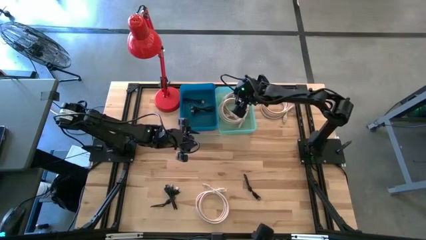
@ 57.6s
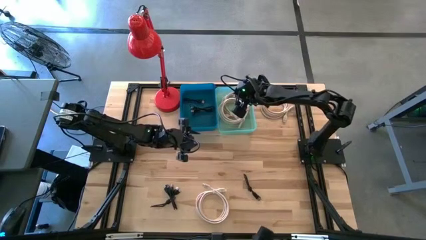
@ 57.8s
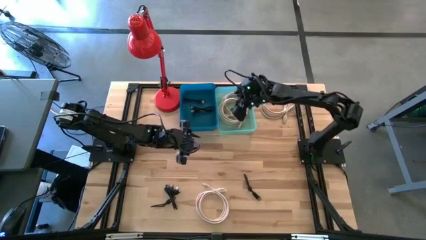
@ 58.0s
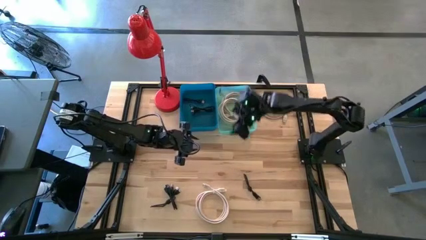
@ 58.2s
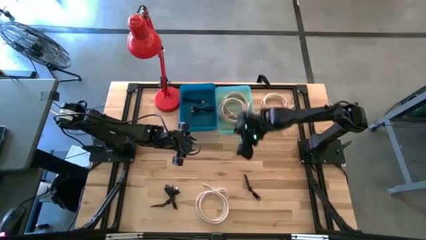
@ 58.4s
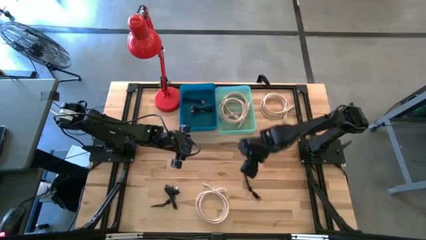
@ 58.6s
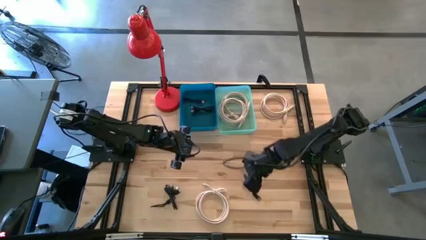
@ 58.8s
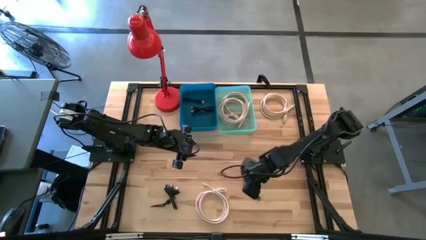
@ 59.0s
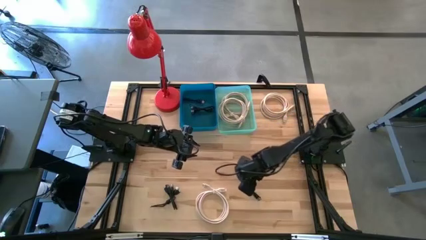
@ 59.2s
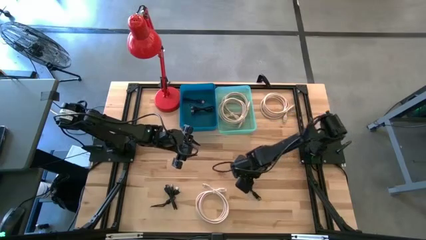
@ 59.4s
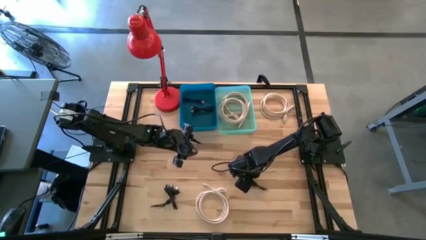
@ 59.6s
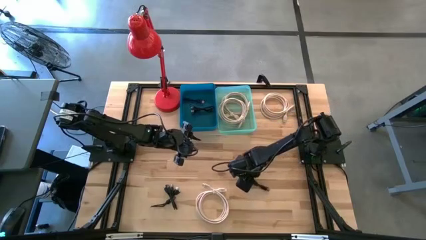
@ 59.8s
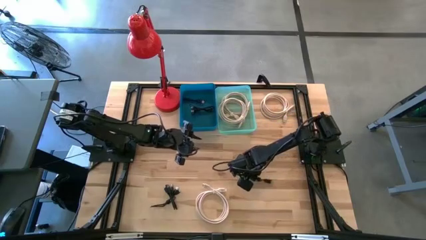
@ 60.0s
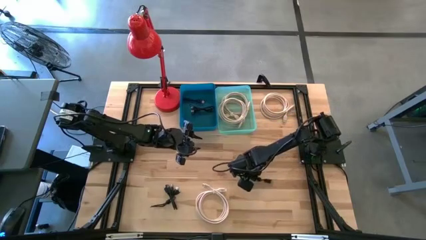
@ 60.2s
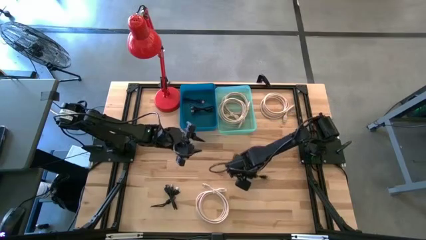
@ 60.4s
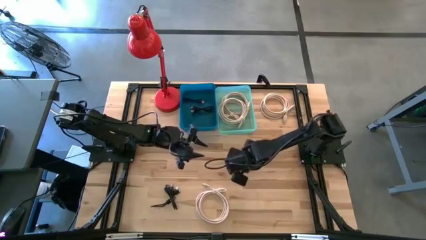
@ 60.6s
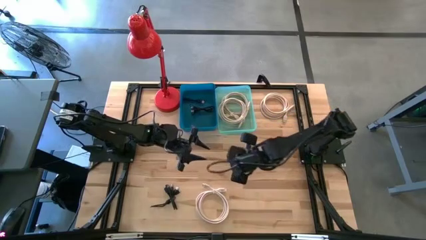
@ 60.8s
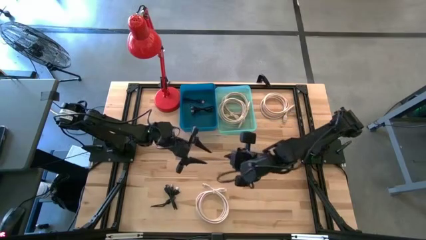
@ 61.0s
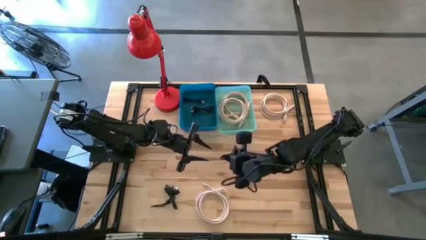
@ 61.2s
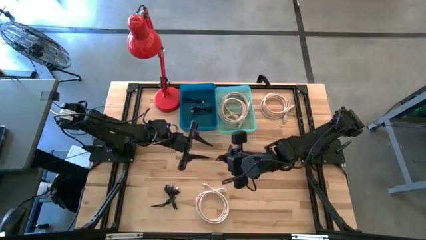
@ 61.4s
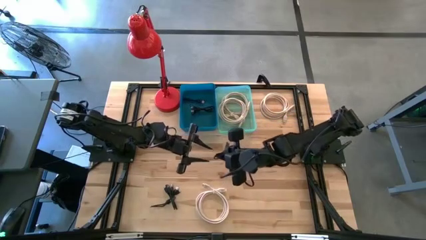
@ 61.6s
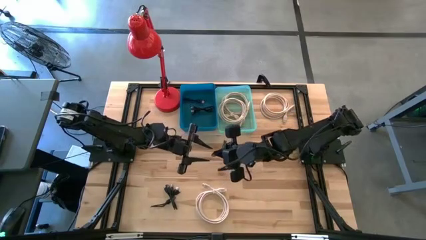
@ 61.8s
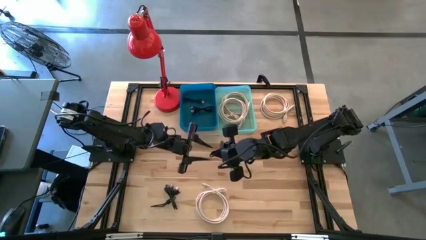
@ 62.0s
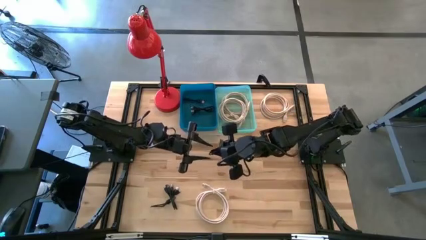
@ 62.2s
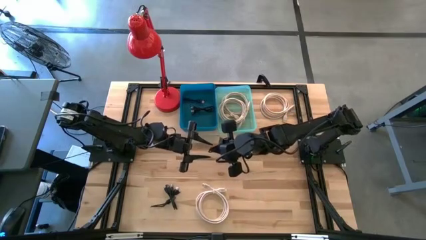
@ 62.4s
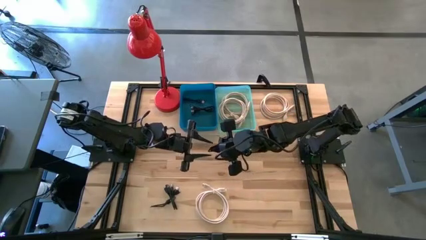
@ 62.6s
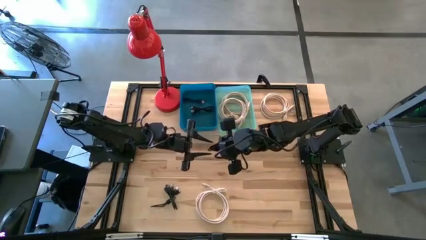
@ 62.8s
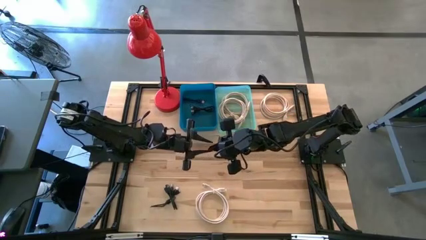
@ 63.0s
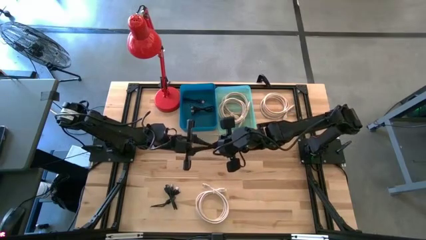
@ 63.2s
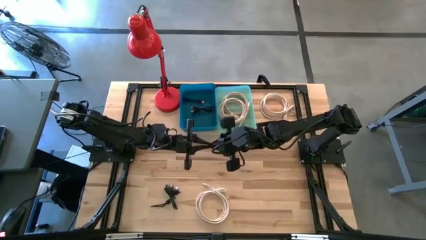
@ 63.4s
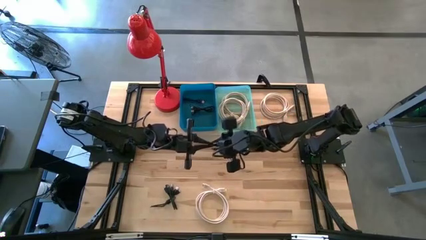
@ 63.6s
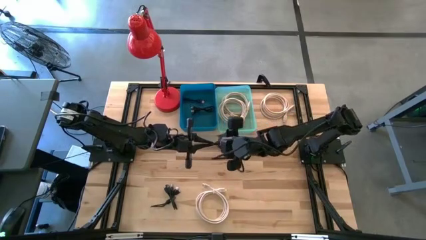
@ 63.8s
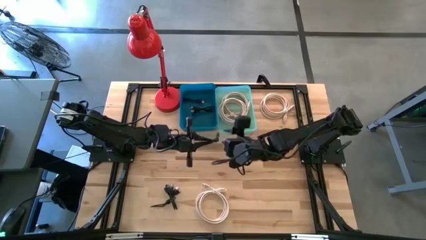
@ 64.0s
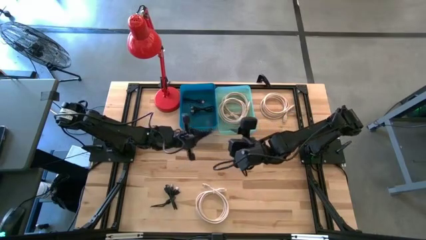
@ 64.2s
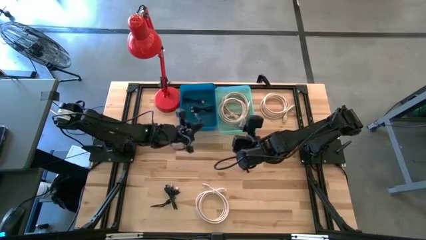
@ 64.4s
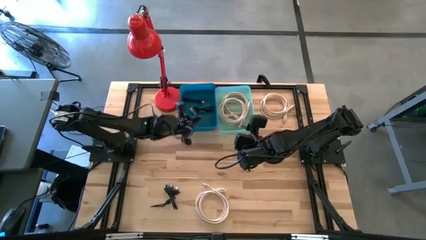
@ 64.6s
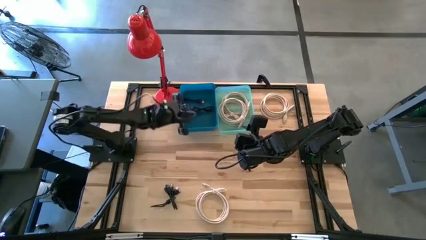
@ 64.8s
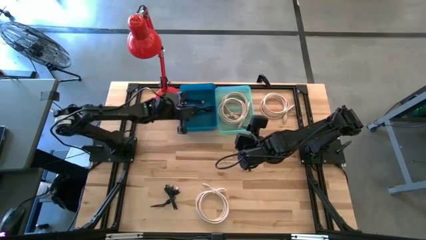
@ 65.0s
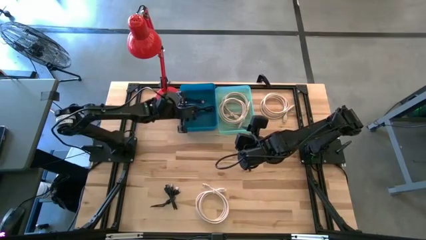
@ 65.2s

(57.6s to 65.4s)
Task: Pick & Place USB Port
Put the black USB cable into the blue bin

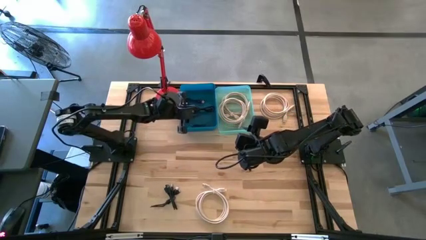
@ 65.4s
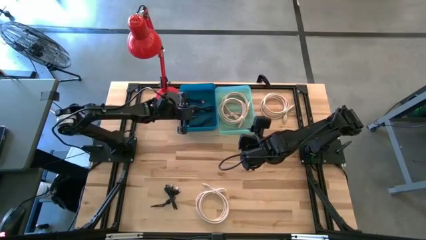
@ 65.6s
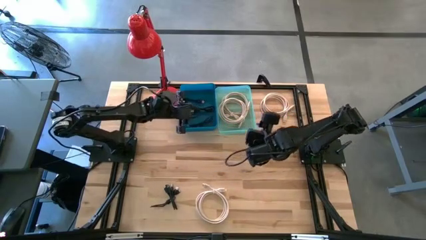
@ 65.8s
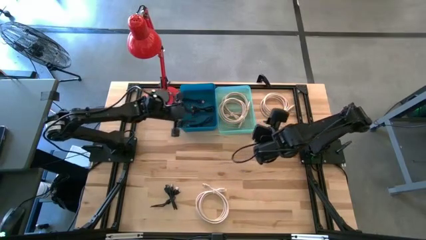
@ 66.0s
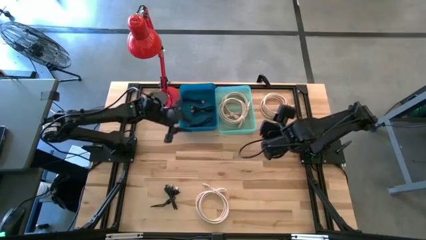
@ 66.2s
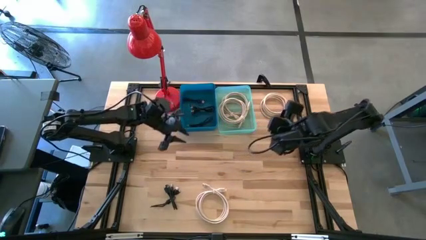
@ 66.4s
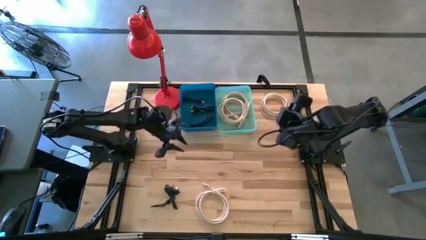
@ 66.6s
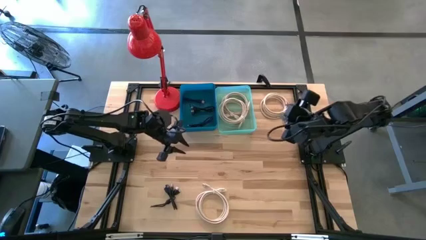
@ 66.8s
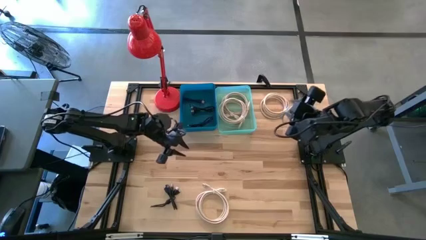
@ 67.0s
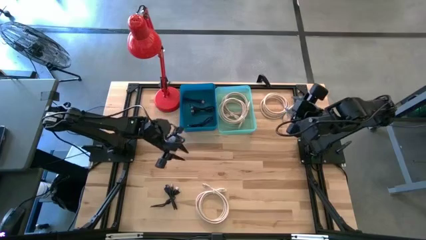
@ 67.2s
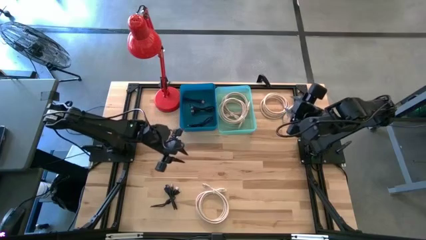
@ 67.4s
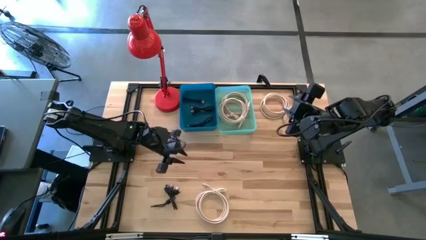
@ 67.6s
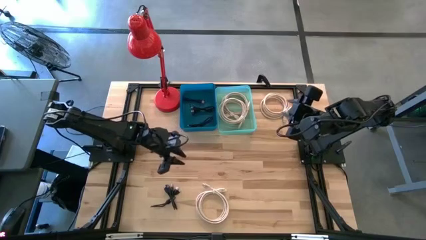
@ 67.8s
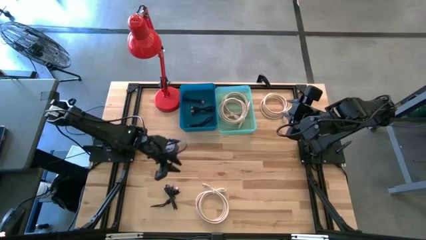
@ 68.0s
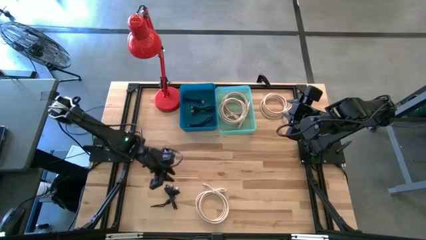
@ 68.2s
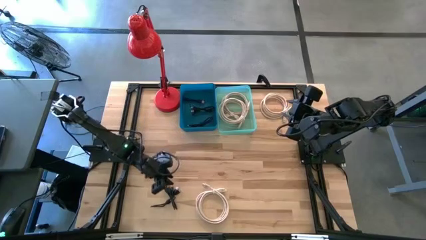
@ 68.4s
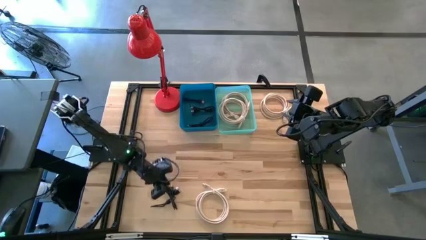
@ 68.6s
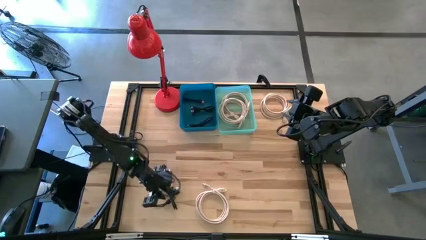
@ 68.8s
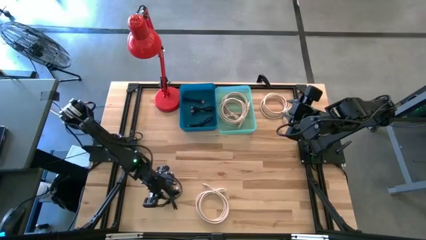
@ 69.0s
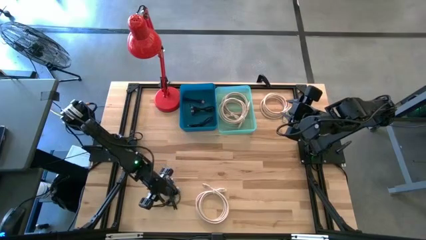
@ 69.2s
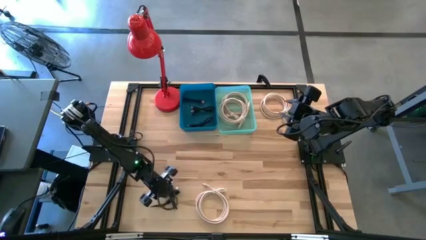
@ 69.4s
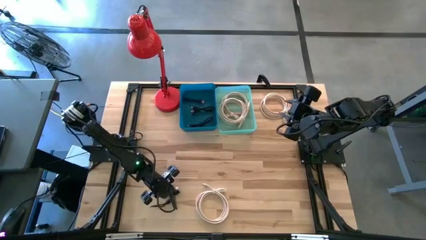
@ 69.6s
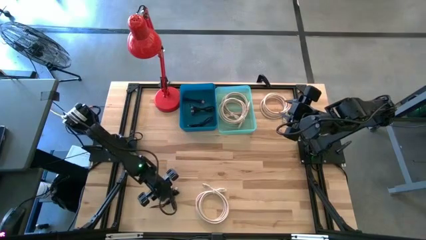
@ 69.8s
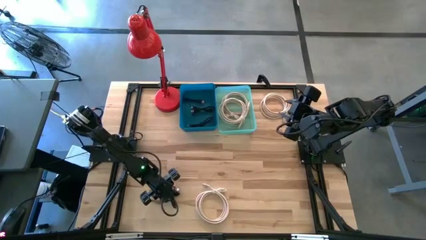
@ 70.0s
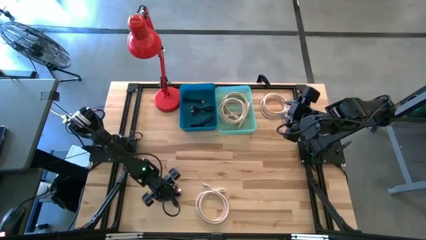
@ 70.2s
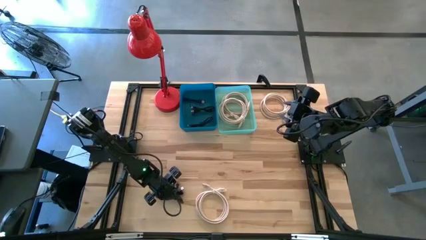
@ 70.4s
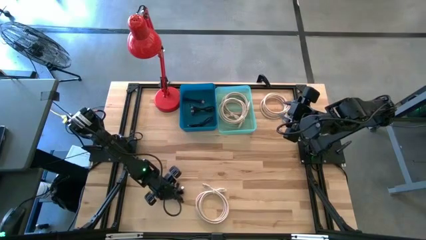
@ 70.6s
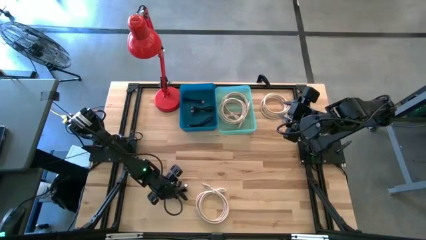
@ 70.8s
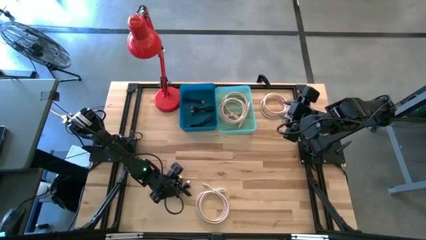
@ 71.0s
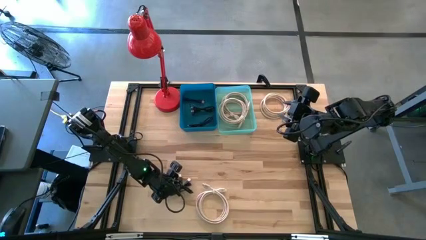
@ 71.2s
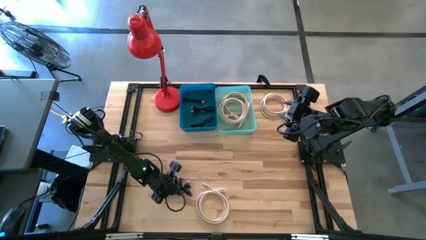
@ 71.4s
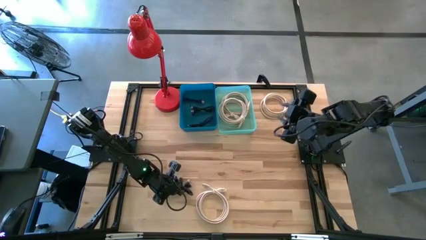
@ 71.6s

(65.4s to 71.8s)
Put the black USB cable into the blue bin

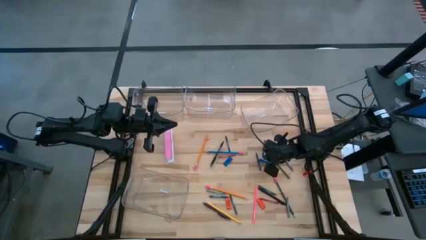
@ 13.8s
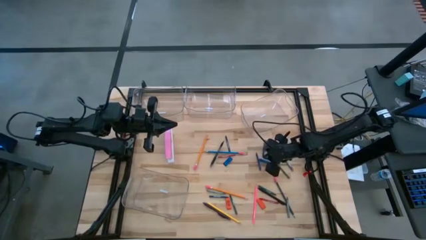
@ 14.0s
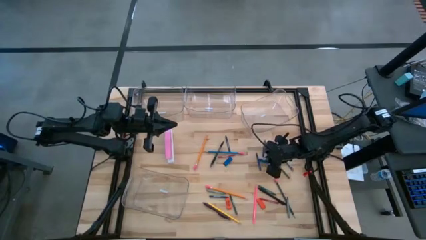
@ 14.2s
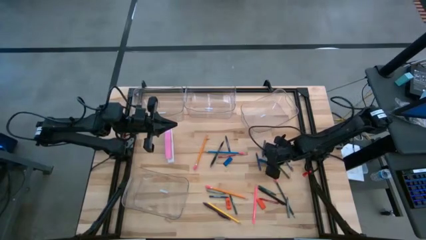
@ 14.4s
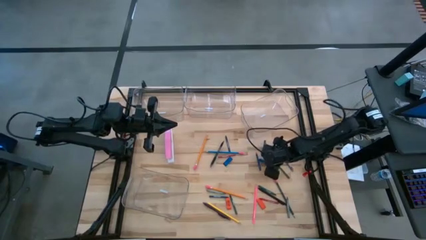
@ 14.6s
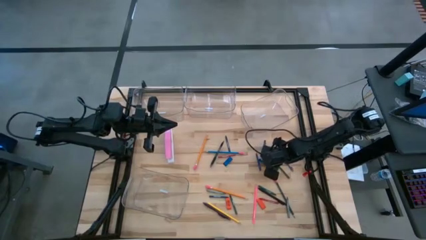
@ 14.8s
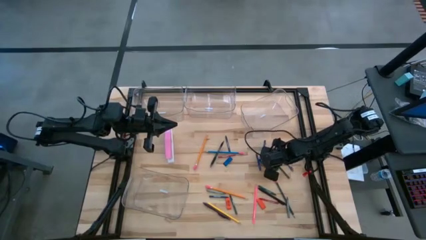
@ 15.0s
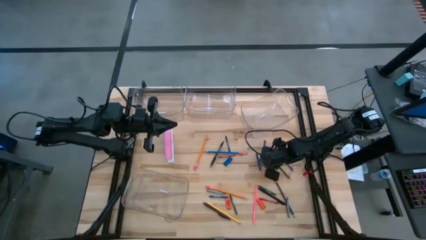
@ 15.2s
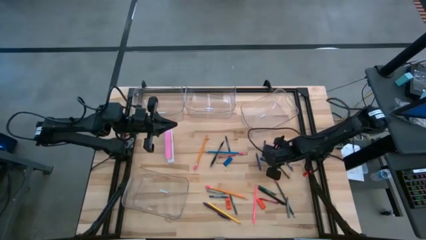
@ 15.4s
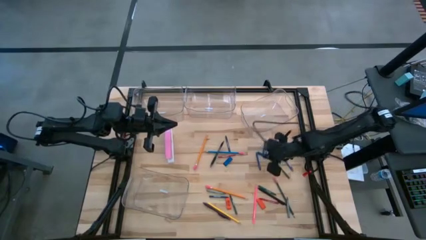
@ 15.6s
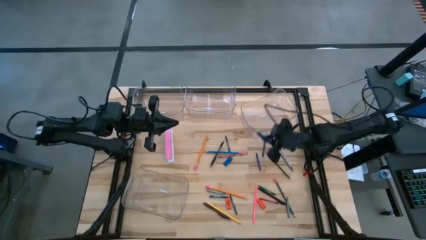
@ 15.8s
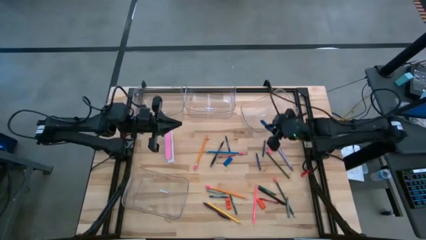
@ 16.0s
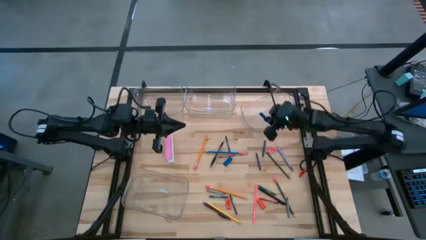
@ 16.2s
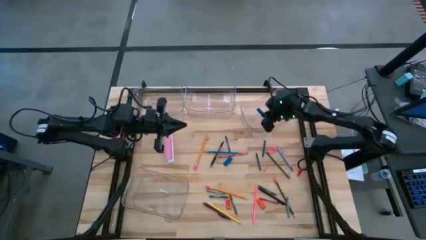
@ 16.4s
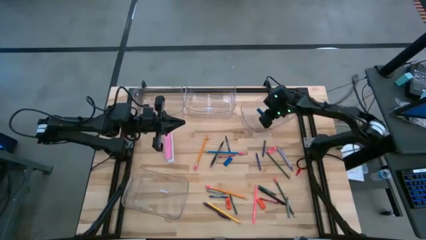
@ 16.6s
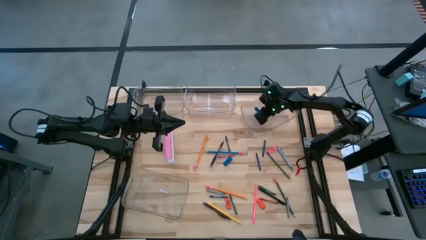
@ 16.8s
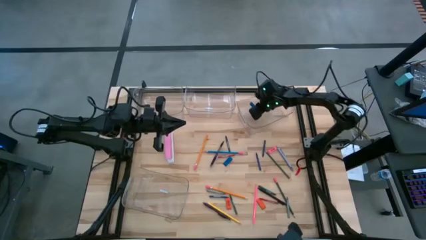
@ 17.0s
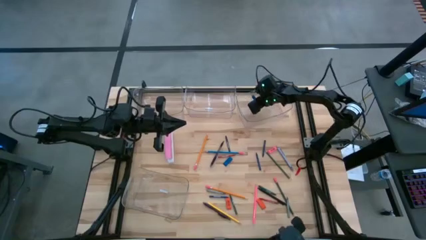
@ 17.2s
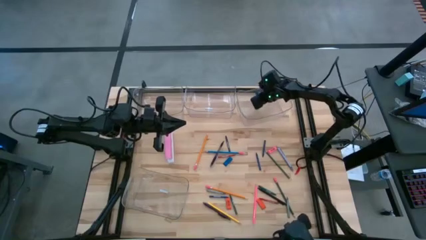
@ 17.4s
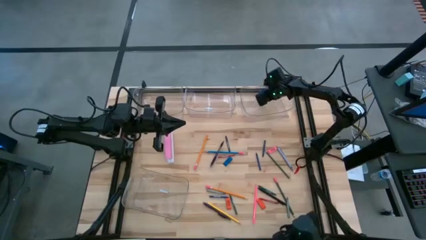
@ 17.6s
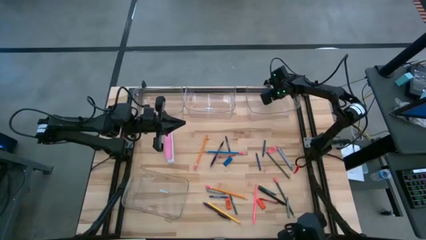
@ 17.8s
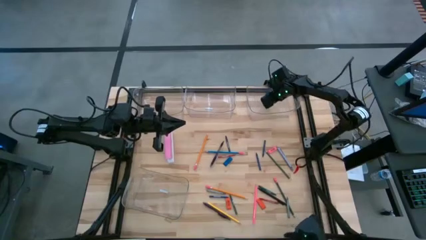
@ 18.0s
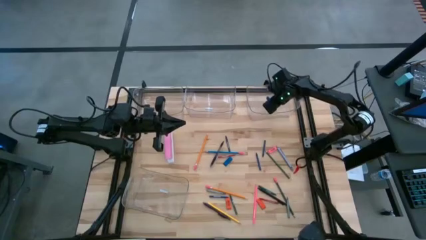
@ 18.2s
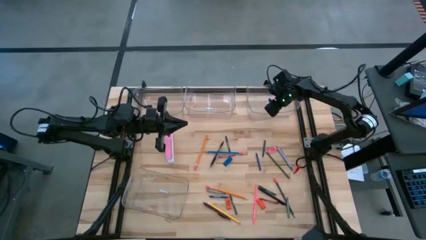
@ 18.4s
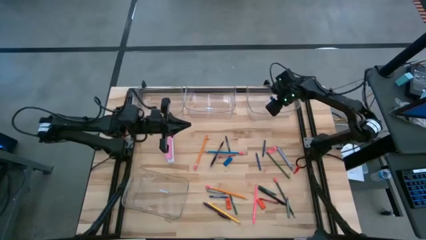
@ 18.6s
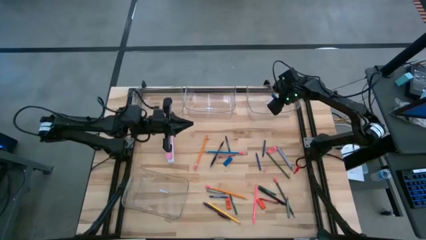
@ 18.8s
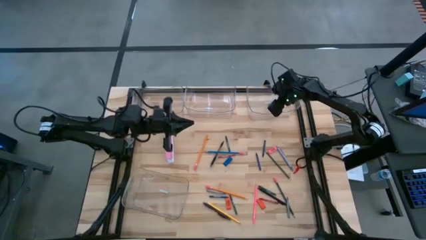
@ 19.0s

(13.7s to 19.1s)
Task: Sort crayons/erasers/pens/pencils in bins
Put the blue eraser into the top right transparent bin
